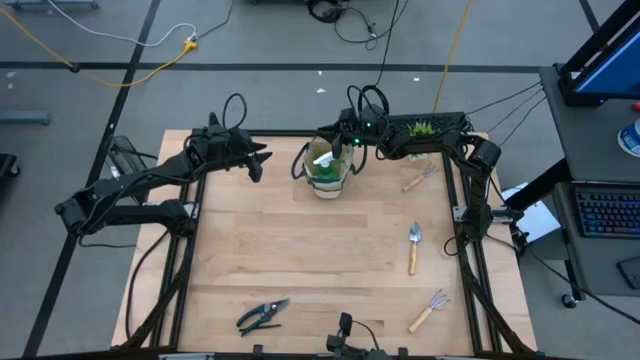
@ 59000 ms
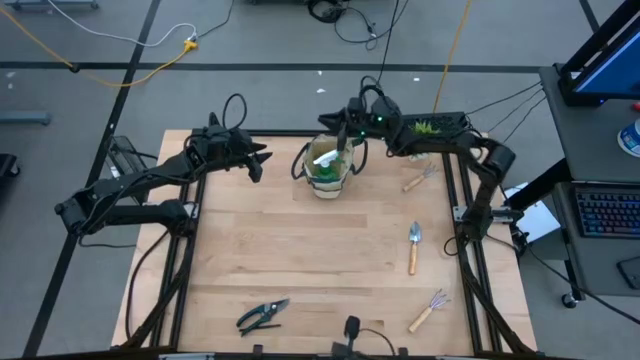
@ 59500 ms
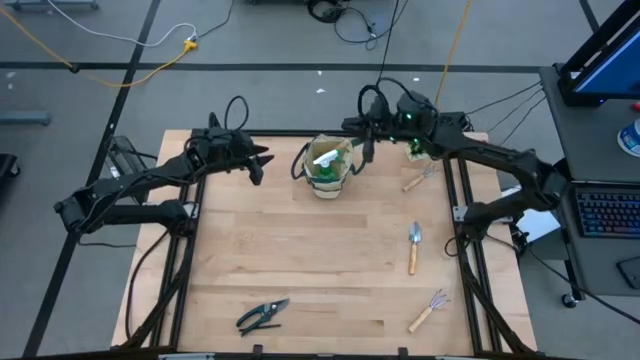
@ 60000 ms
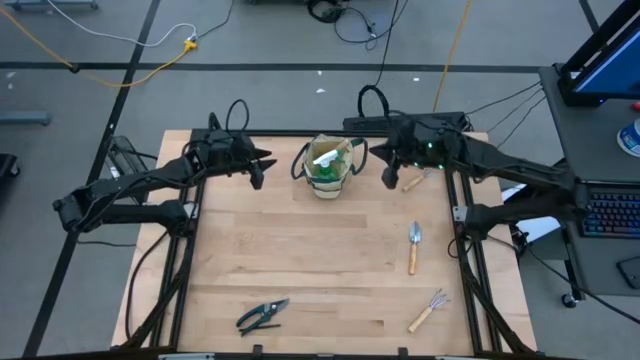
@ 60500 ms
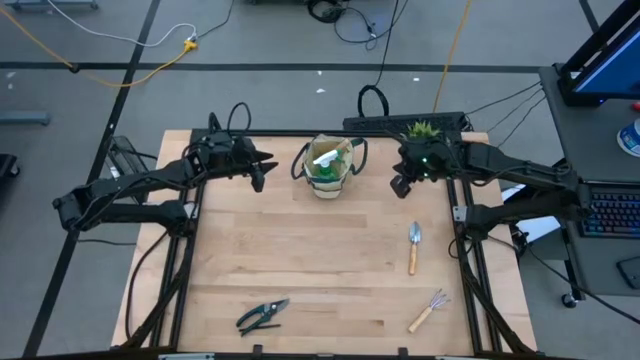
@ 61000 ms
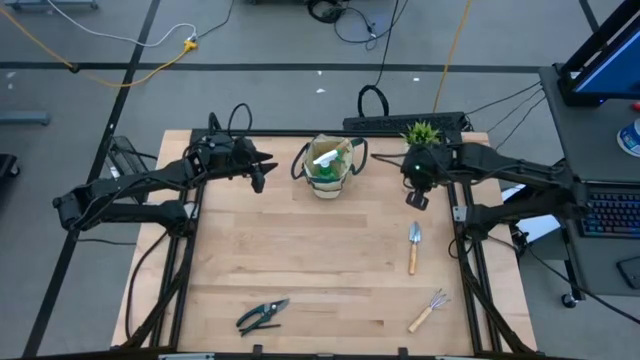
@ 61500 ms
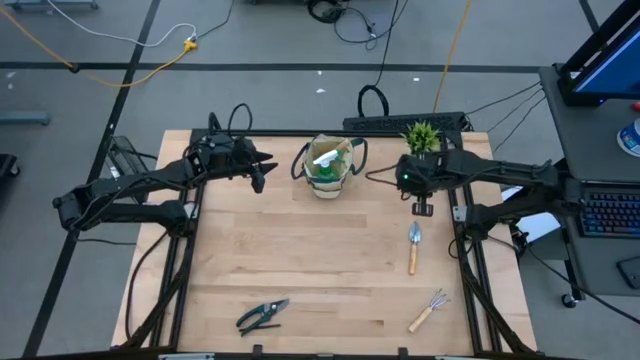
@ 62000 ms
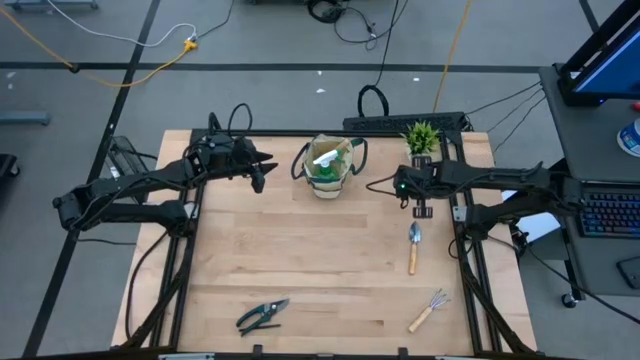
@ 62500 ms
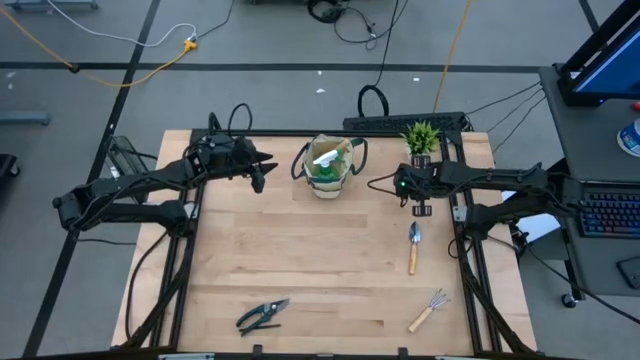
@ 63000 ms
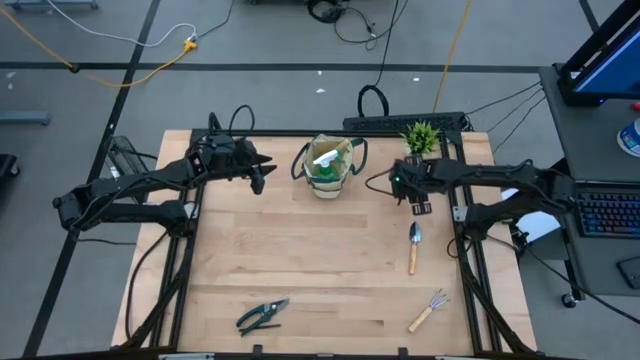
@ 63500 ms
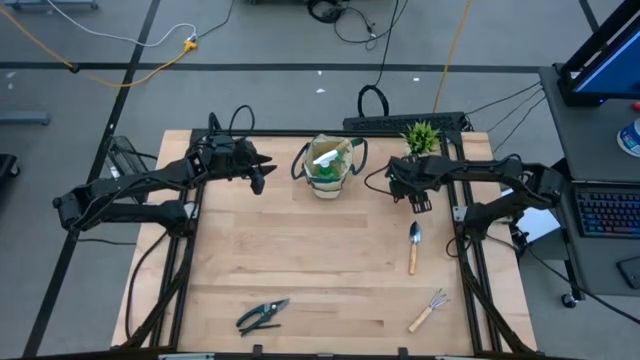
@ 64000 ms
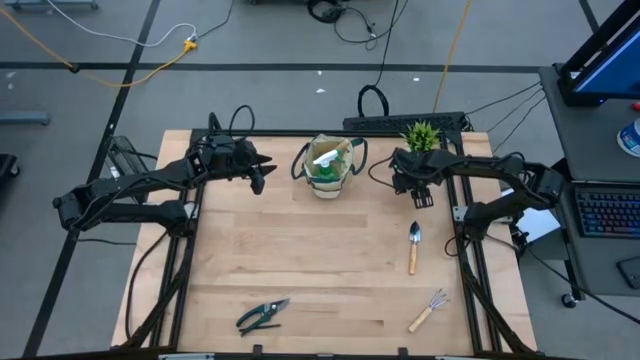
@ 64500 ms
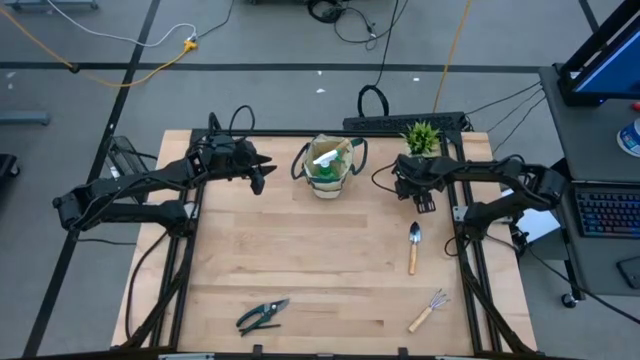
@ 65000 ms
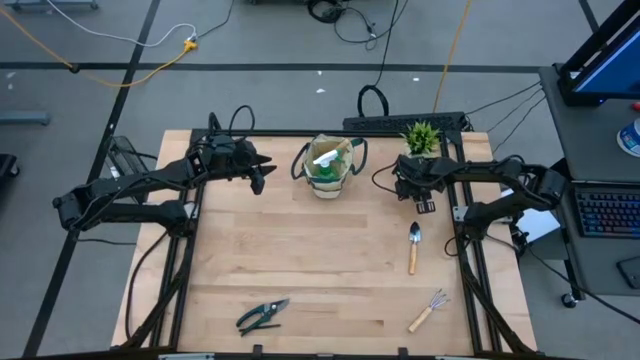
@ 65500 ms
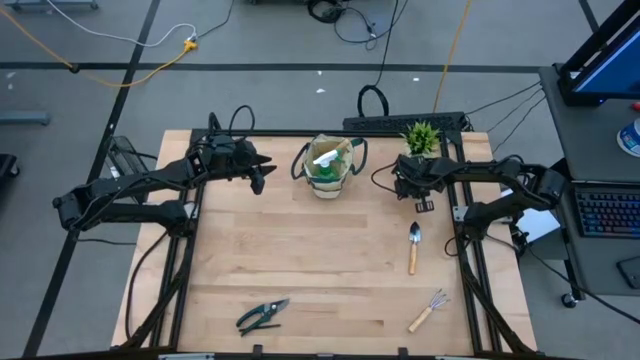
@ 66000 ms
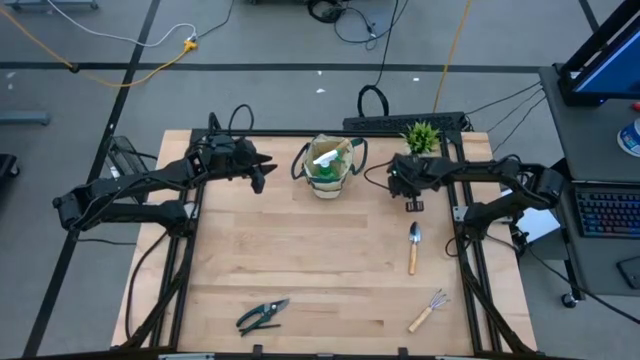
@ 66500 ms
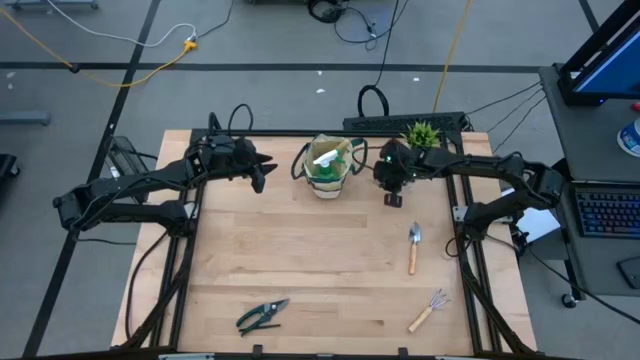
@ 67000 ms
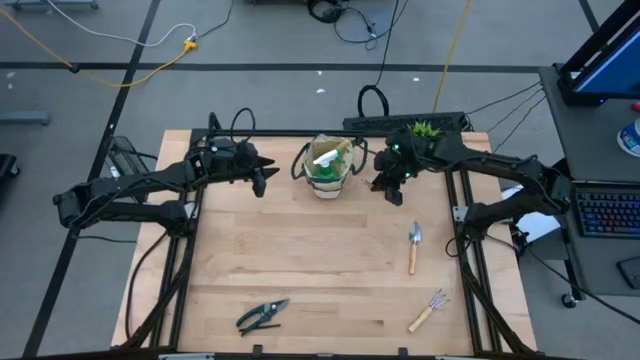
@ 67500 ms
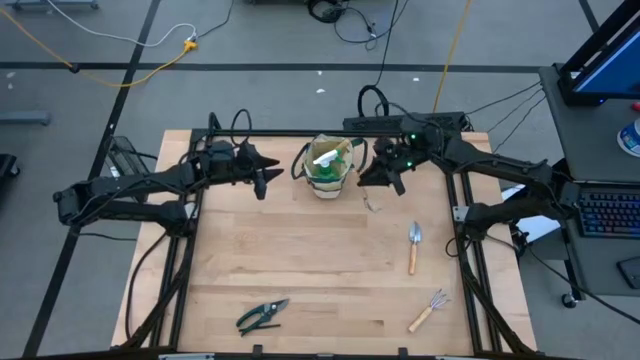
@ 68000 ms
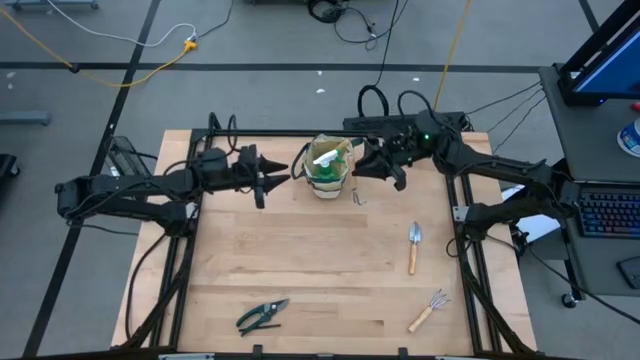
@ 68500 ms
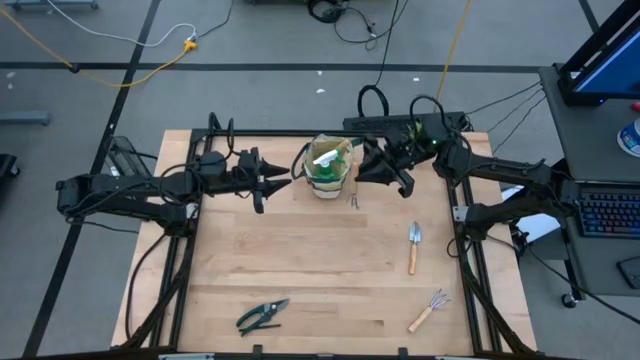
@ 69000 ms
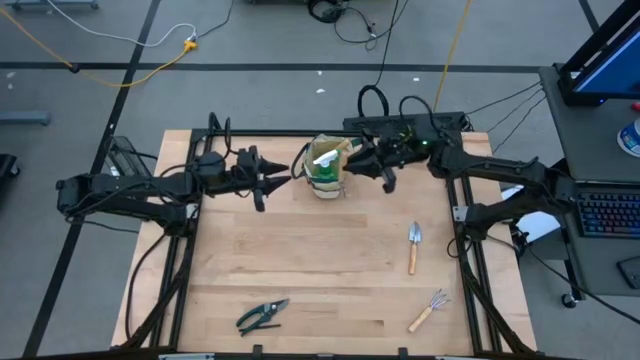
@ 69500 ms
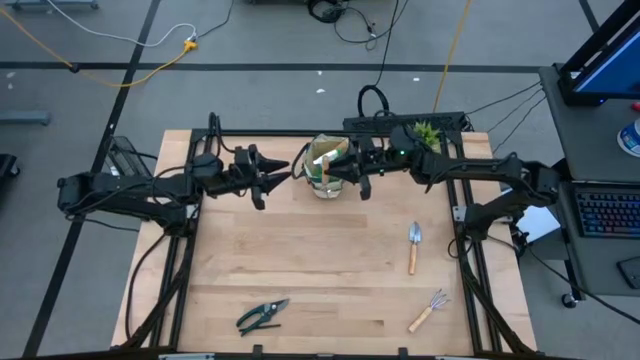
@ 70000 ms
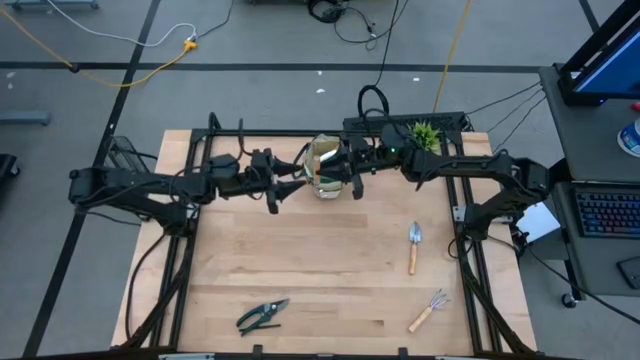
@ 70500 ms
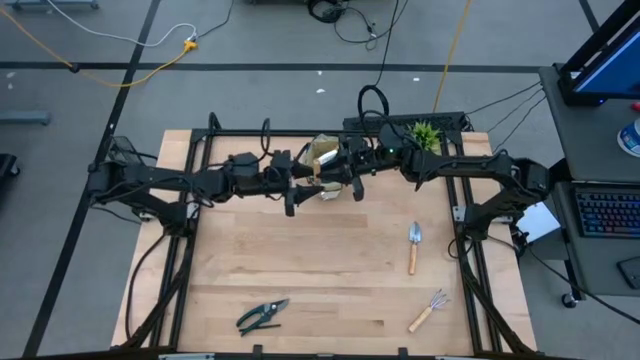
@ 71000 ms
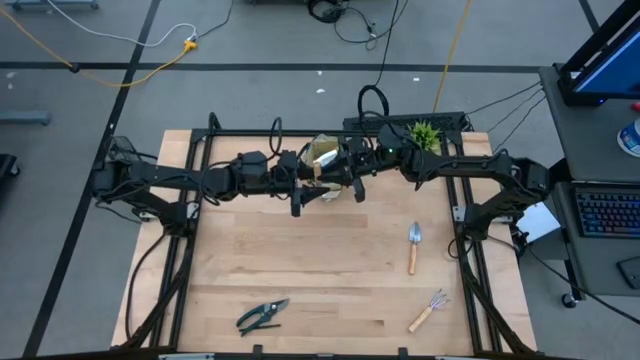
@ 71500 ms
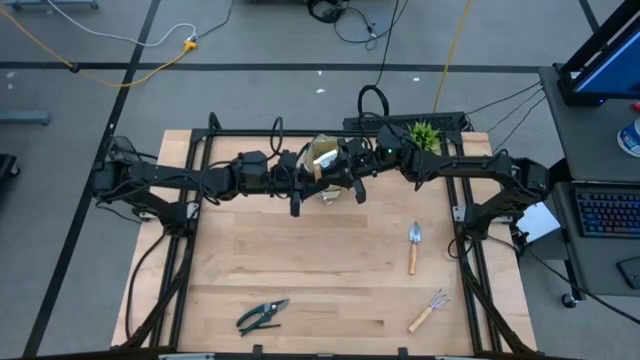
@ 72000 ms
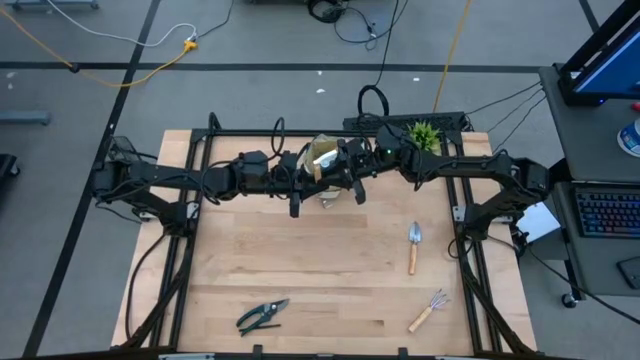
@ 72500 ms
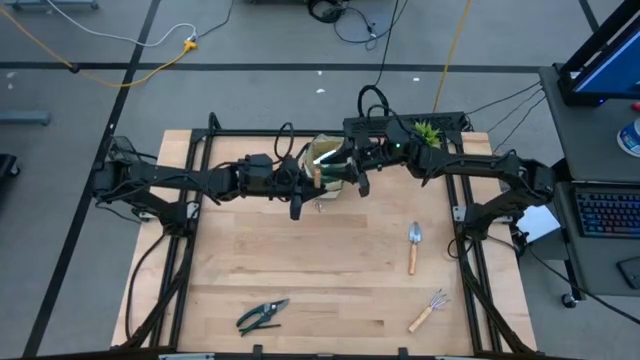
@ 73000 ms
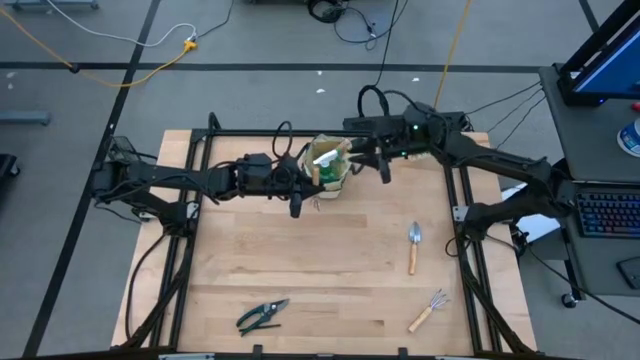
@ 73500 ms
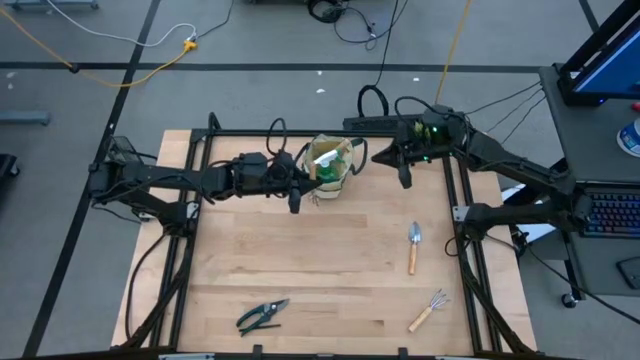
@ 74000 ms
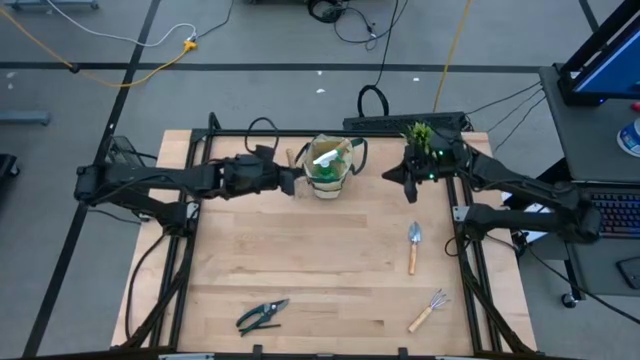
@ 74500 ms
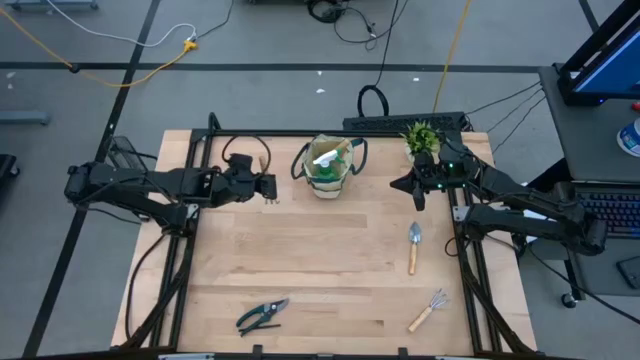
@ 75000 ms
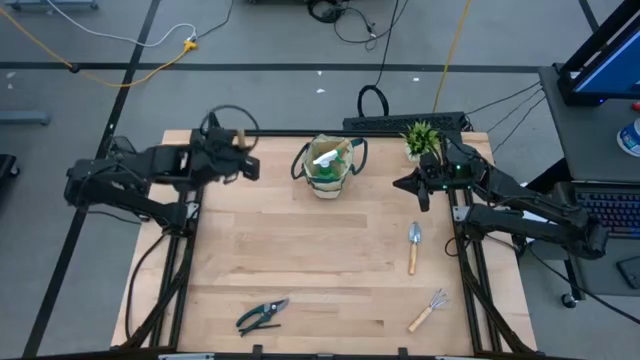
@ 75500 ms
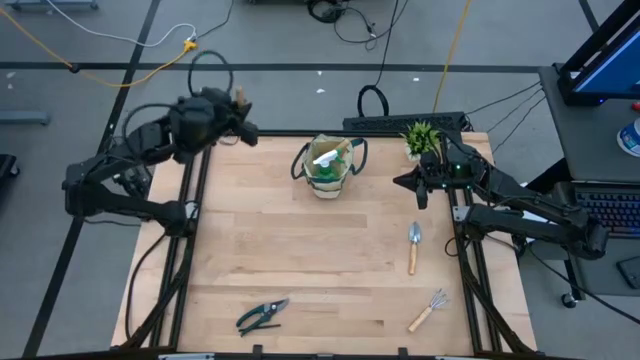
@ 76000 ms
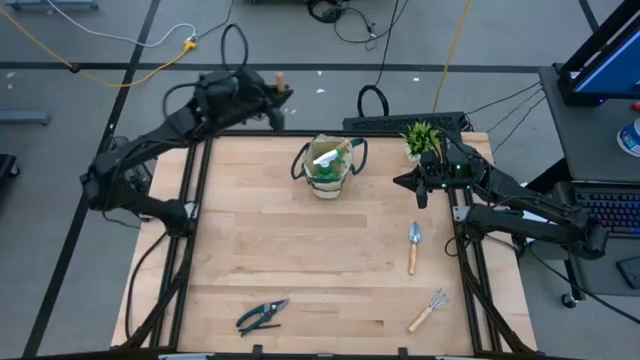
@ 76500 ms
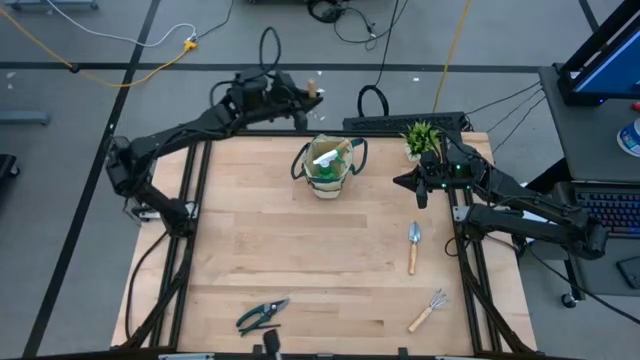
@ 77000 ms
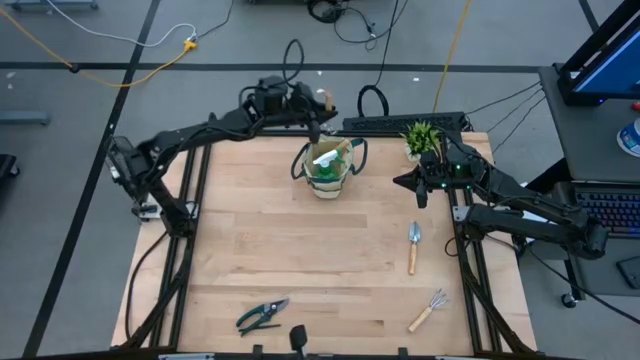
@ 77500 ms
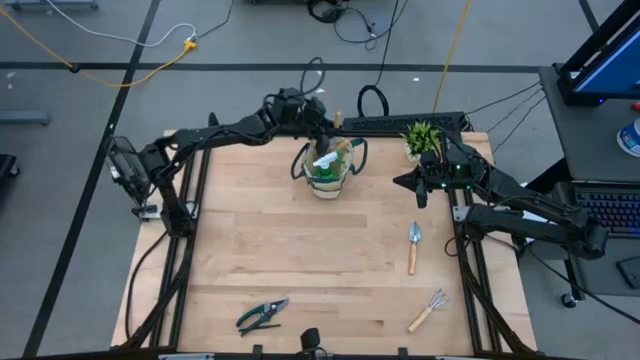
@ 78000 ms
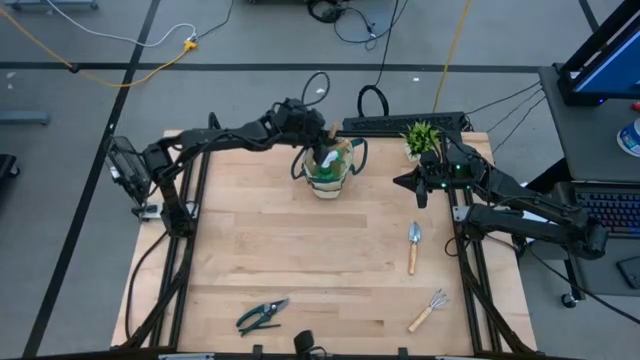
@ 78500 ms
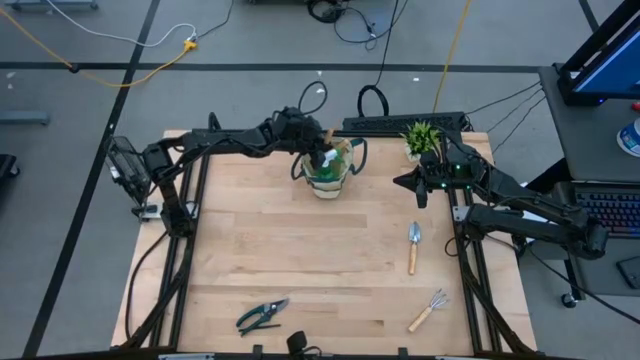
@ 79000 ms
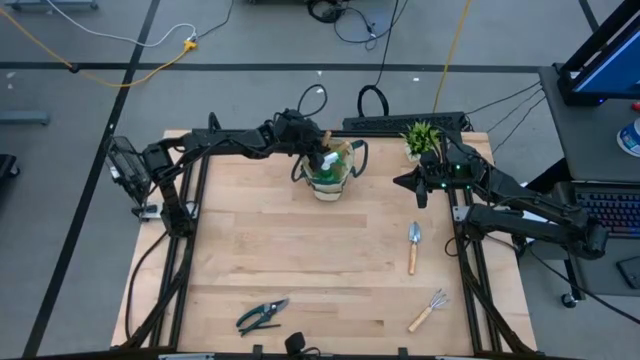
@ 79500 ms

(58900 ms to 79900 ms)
Task: Pick & Place Garden tools in Gardening bag
Put the top brown hand rake into the gardening bag
